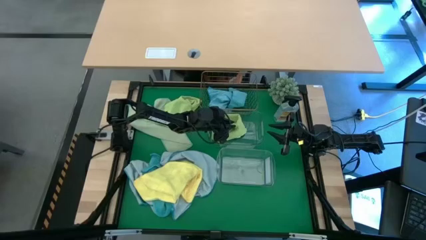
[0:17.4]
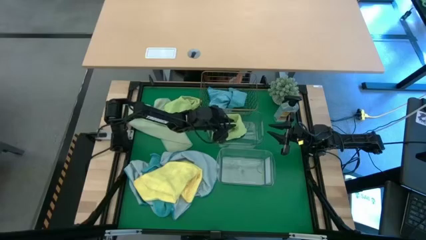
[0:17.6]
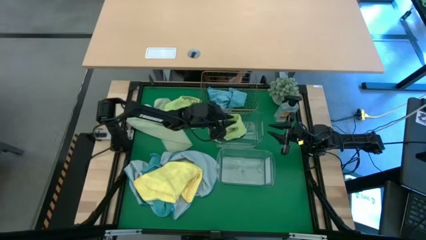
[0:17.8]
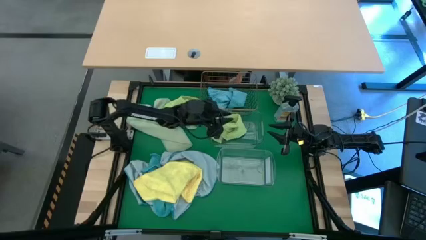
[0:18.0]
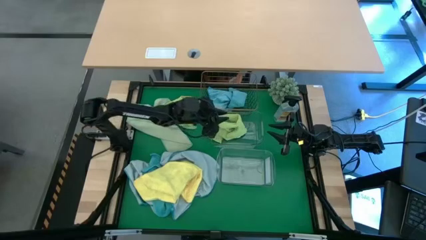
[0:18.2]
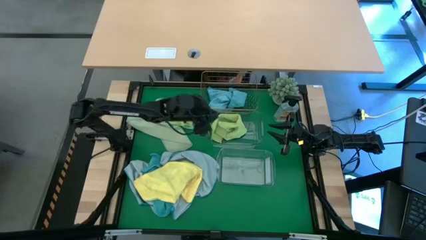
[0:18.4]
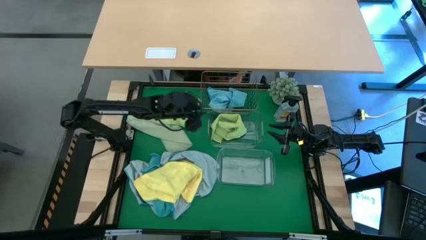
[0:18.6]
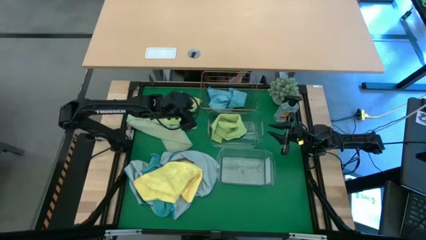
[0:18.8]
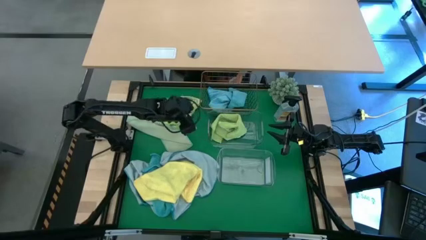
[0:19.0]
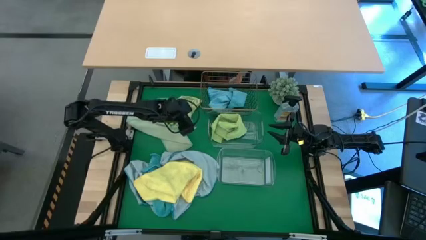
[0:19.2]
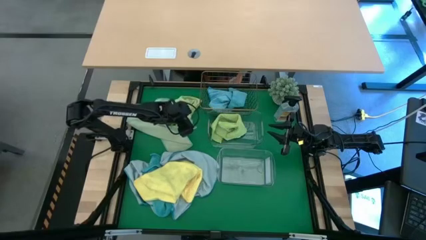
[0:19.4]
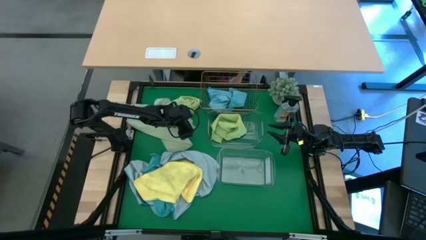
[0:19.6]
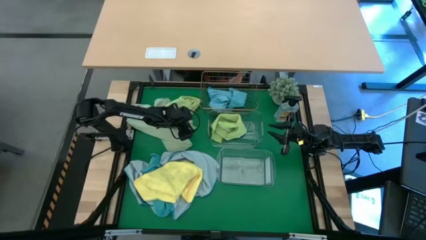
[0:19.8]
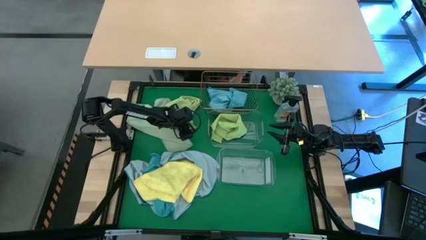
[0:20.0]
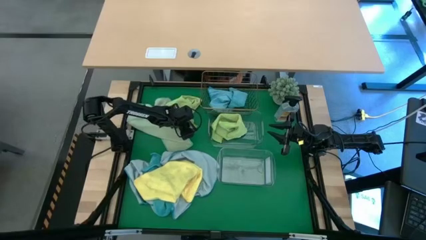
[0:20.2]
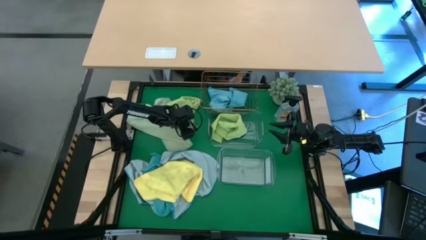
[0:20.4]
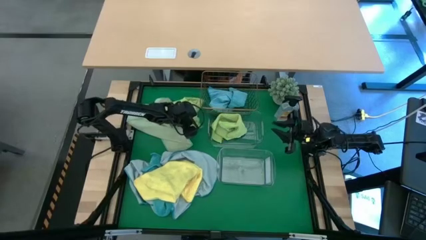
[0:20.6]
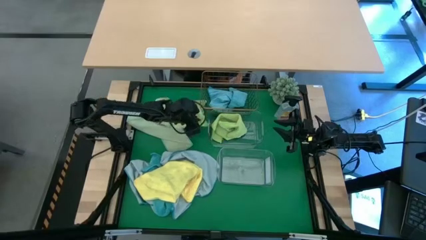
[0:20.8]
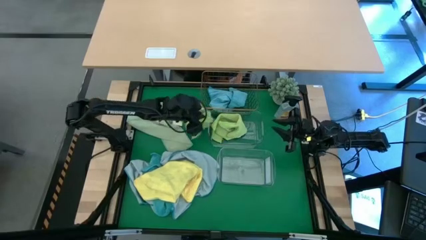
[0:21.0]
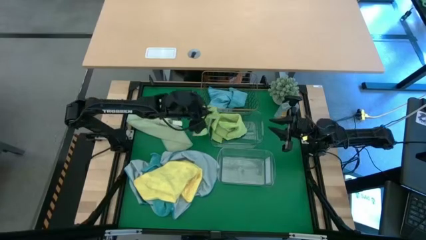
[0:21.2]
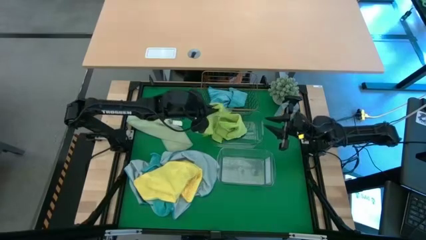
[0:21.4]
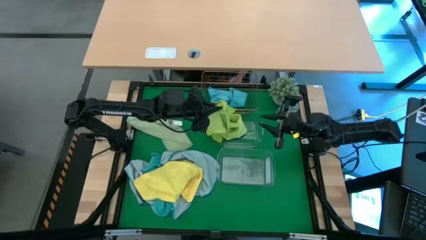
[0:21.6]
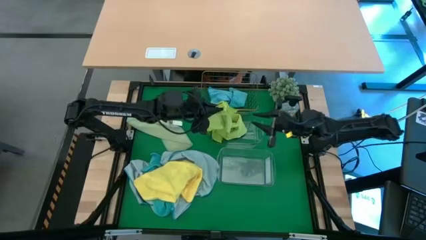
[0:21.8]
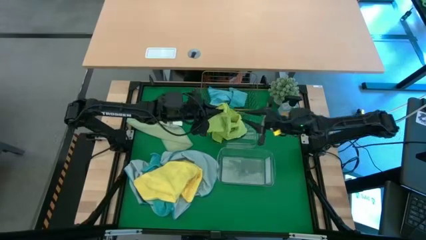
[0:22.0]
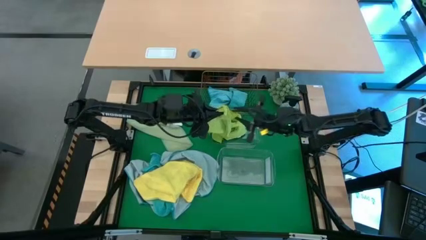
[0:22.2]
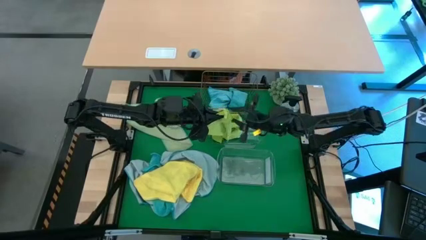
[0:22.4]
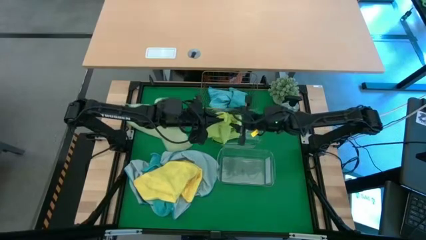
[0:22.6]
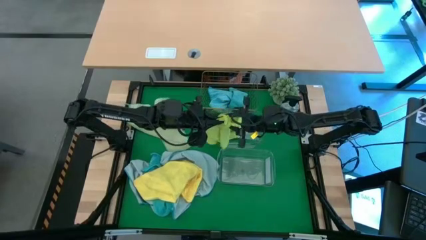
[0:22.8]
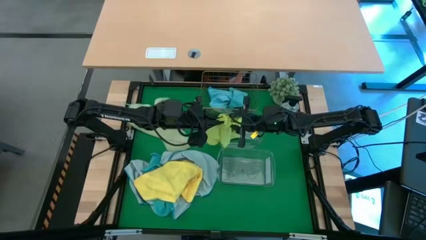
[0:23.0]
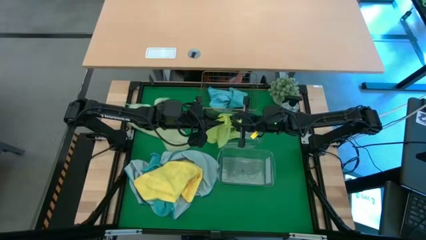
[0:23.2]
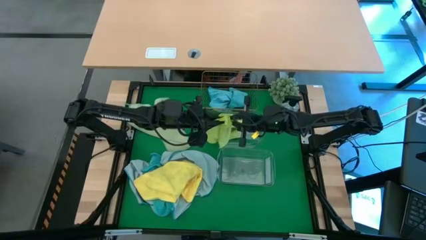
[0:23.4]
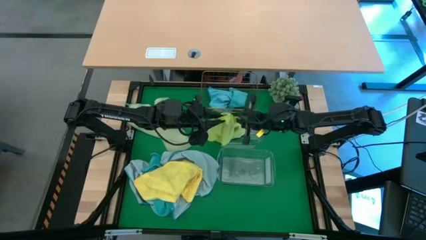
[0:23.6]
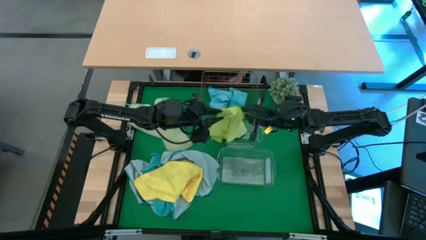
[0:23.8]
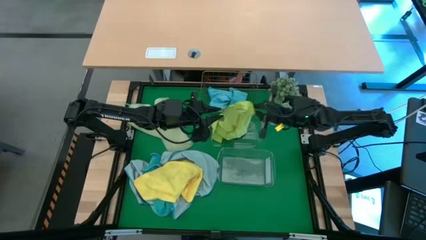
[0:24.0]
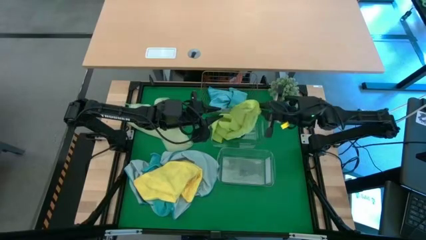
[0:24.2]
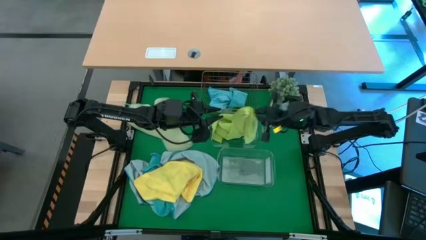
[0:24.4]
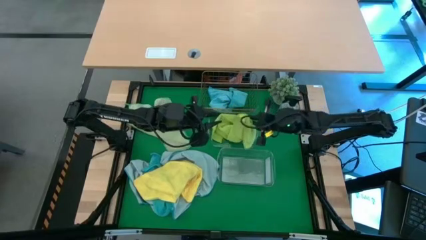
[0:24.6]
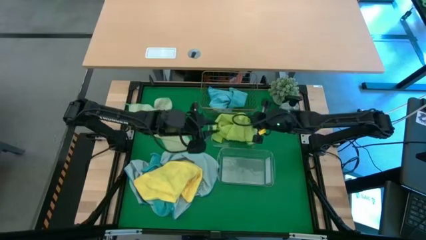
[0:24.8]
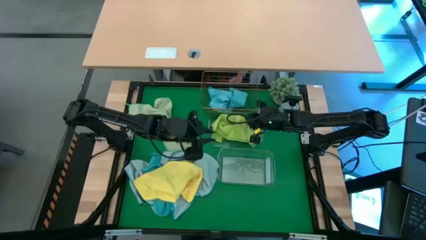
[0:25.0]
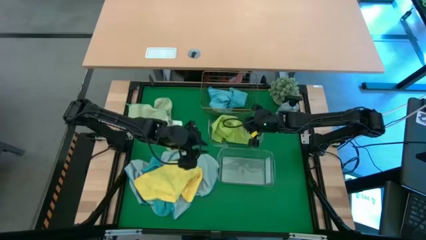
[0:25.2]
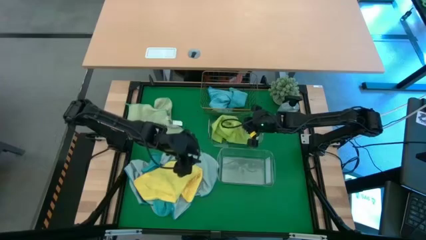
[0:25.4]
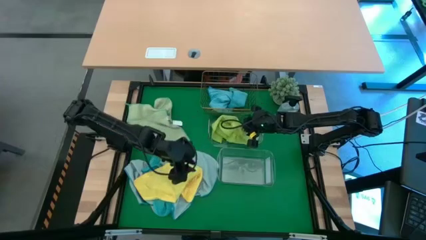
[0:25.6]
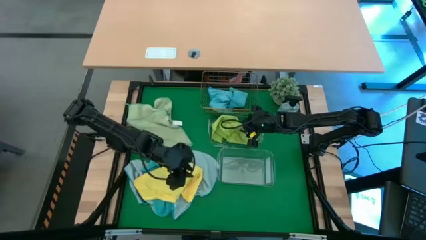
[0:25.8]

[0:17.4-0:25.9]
Task: Sort microfiber towel by color & place in baskets
Put the green microfiber towel into the top transparent bin

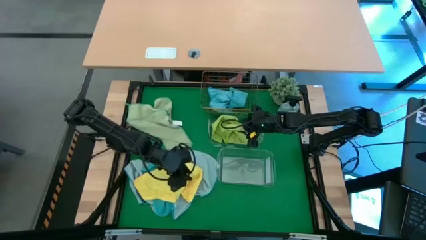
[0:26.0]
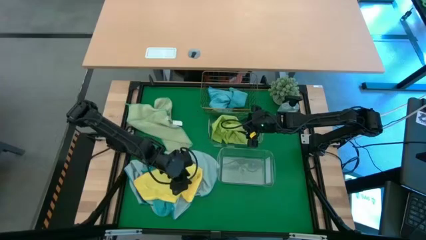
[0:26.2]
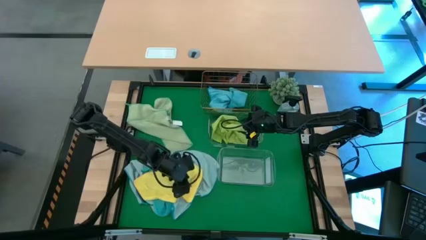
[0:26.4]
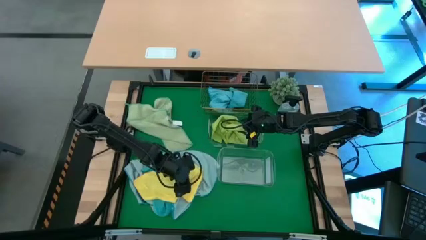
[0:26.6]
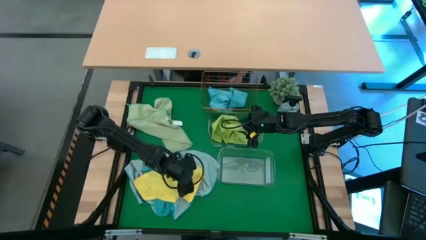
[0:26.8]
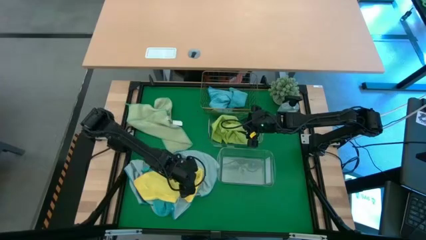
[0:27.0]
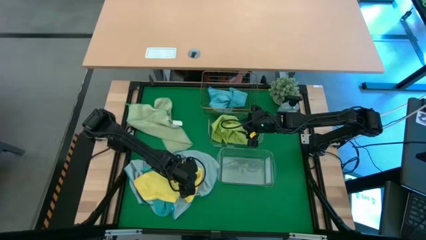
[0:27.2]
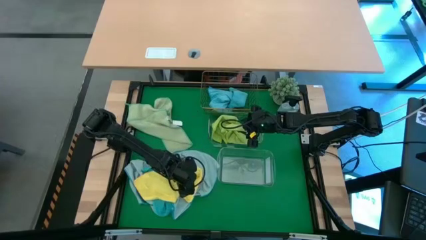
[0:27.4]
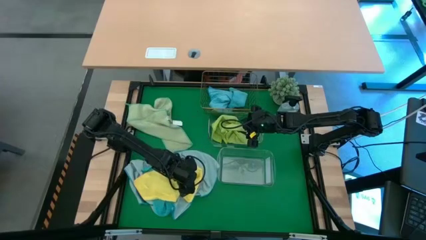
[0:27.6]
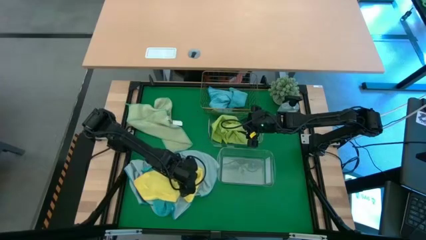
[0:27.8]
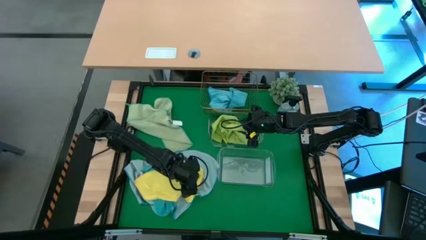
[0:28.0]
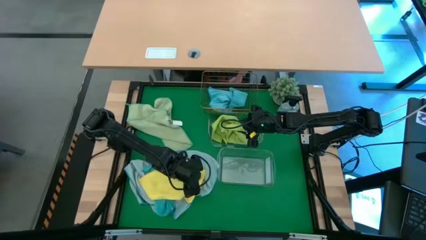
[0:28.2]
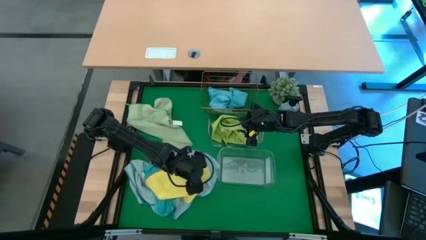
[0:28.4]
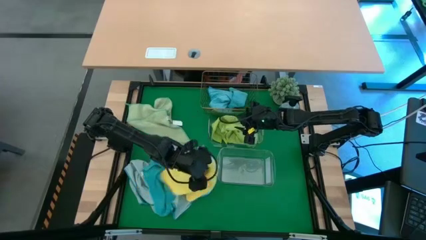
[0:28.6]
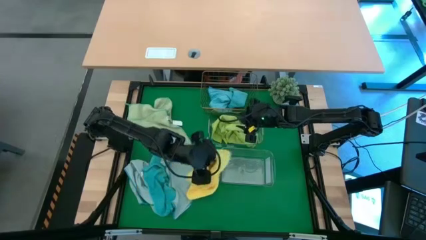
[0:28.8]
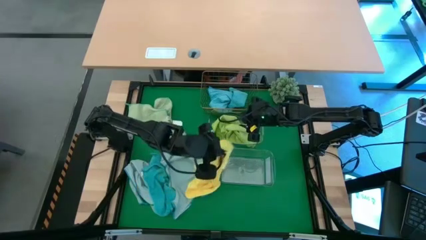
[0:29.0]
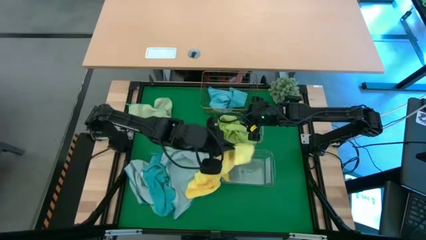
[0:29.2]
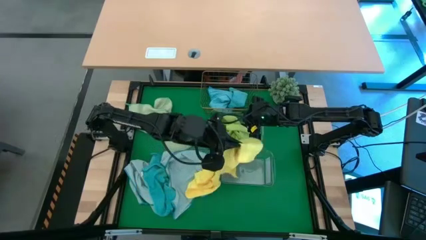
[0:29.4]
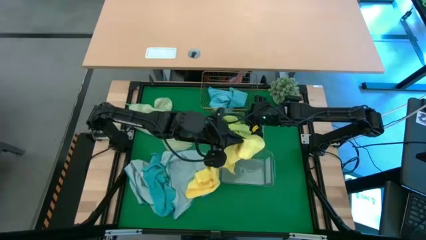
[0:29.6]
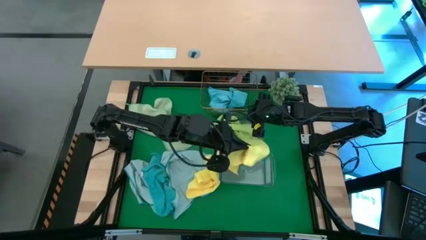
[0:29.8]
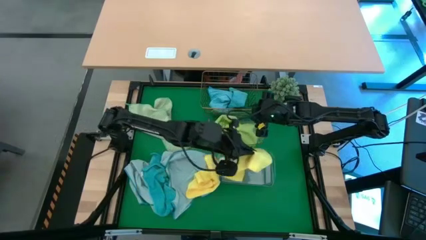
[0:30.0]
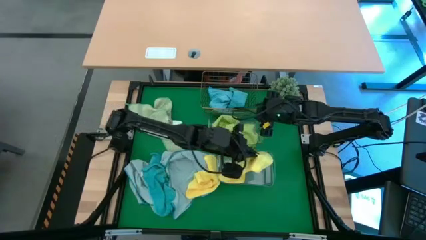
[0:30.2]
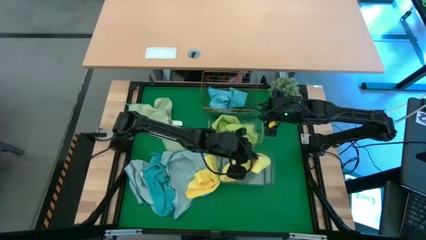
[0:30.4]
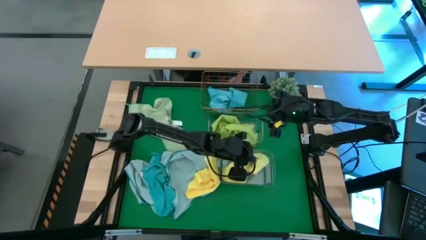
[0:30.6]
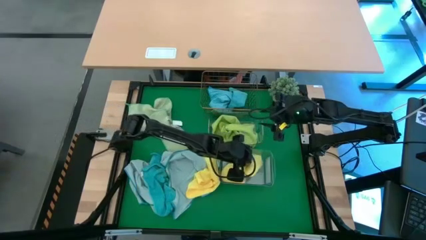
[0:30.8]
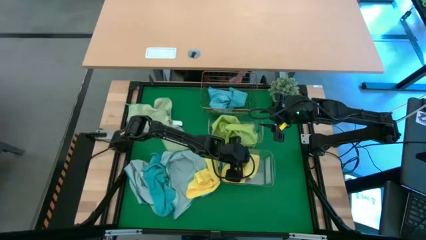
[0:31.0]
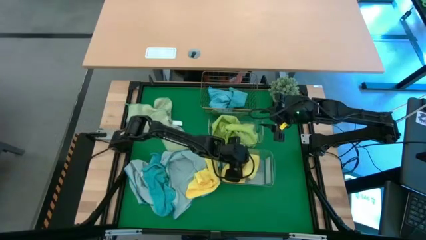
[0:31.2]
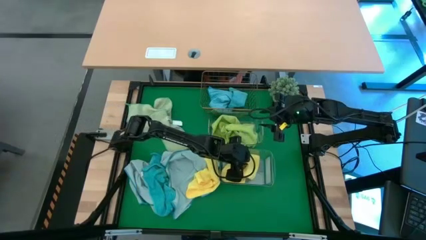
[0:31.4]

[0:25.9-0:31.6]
Put the yellow microfiber towel into the bottom transparent bin

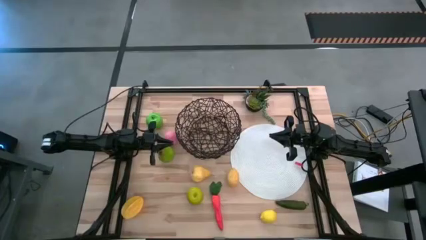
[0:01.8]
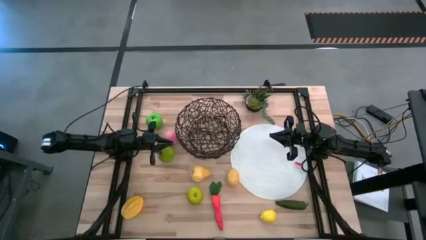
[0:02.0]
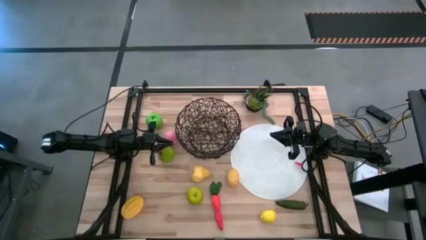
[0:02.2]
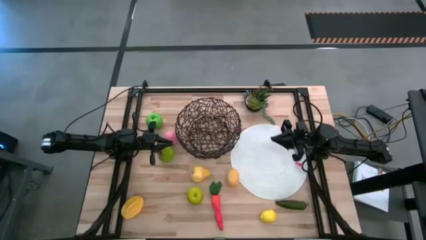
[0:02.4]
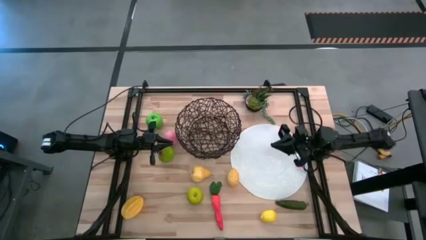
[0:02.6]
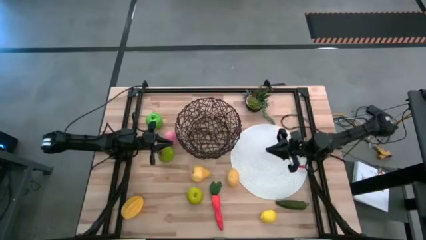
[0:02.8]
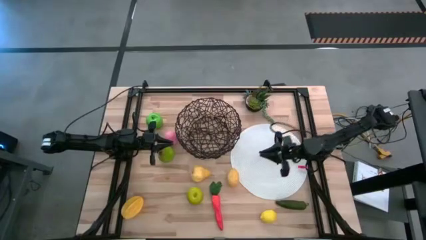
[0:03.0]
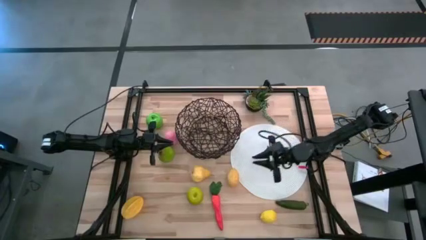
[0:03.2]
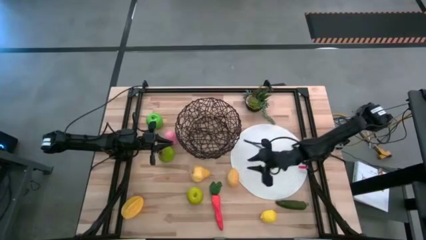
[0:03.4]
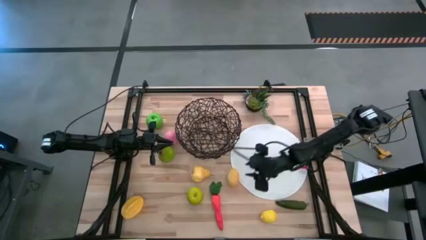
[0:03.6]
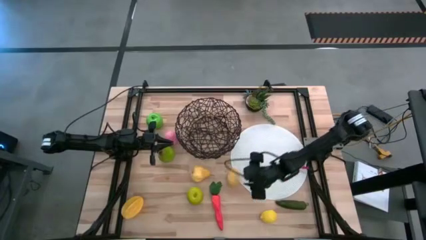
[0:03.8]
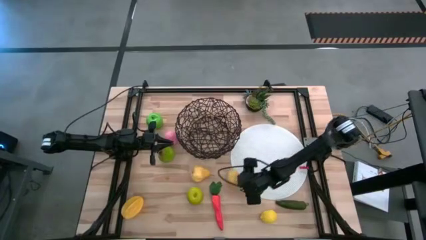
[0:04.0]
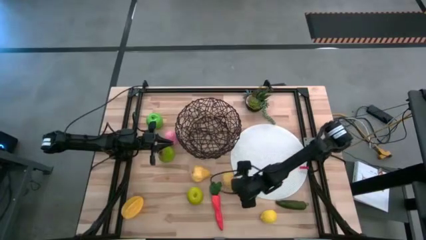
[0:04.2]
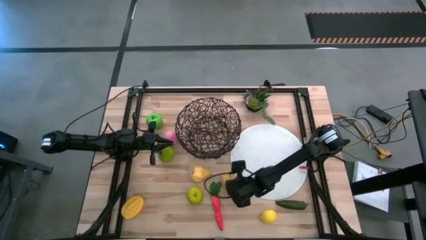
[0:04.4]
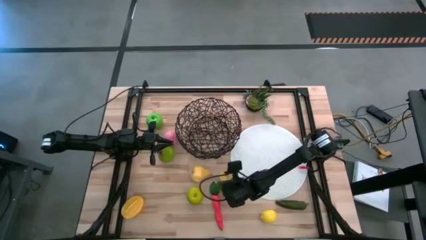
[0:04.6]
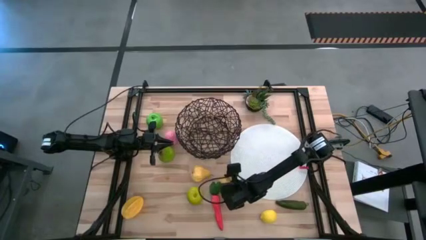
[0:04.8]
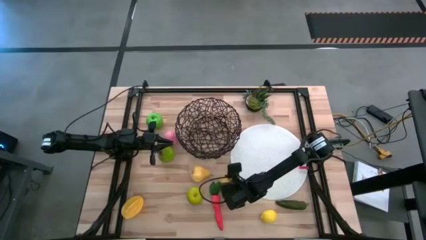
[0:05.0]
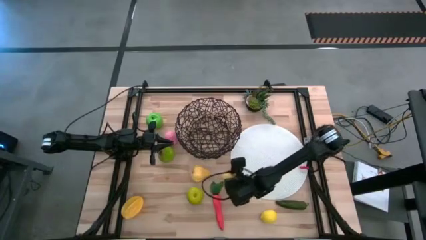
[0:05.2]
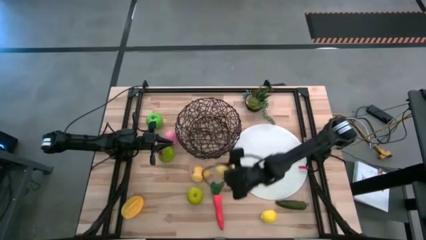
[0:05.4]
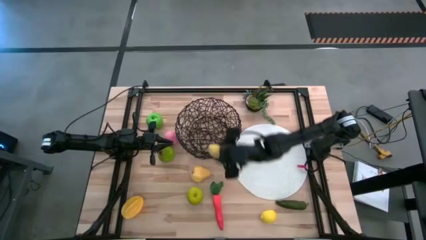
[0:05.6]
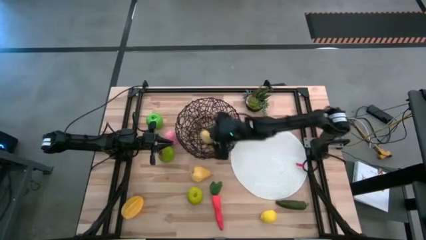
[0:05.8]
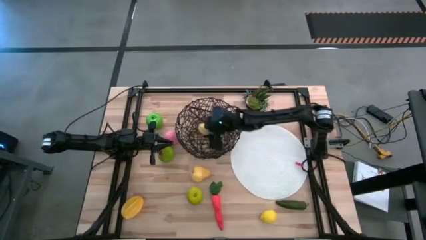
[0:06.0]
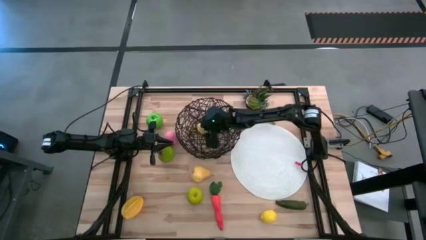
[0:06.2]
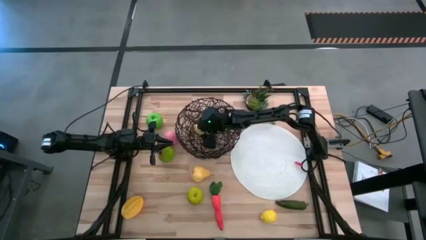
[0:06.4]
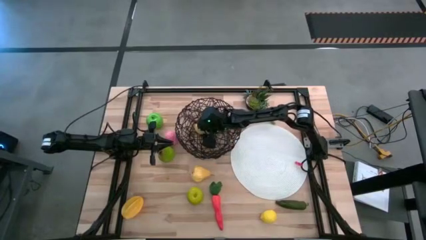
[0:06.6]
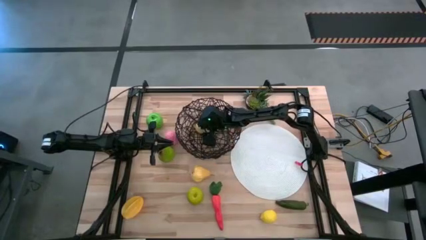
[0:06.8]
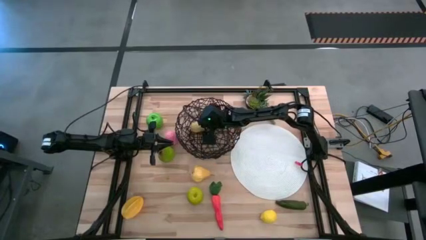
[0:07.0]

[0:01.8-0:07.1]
Task: Build produce basket
Put the top lemon into the wire basket
